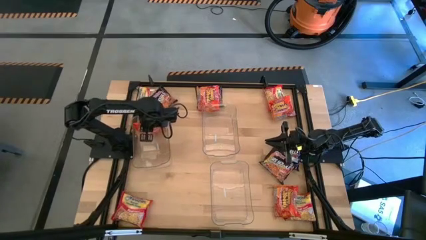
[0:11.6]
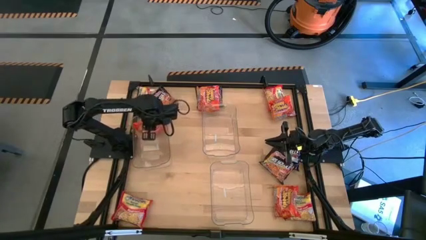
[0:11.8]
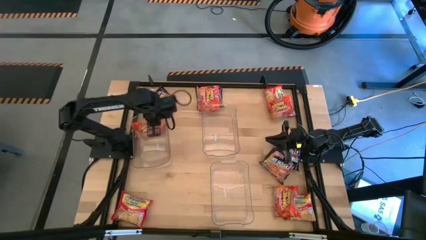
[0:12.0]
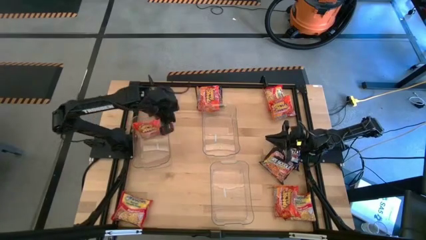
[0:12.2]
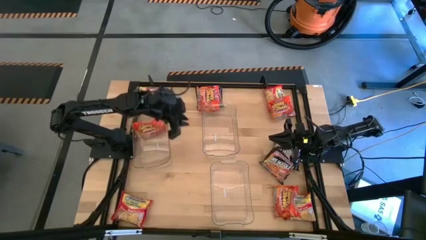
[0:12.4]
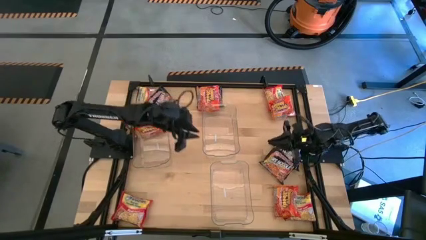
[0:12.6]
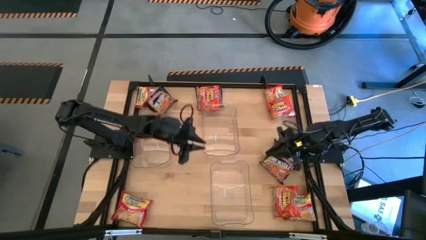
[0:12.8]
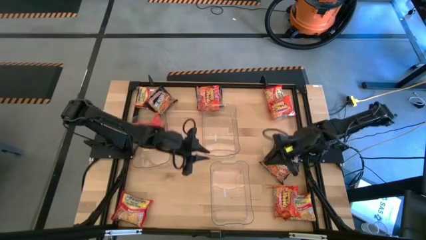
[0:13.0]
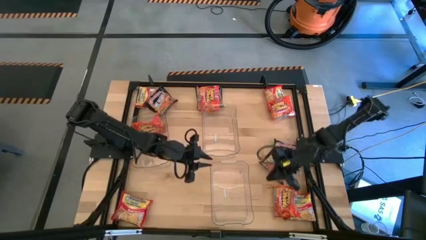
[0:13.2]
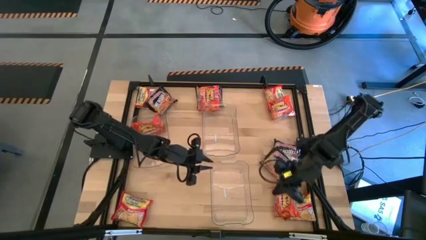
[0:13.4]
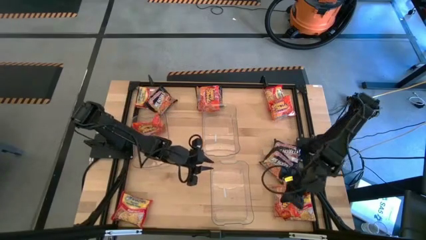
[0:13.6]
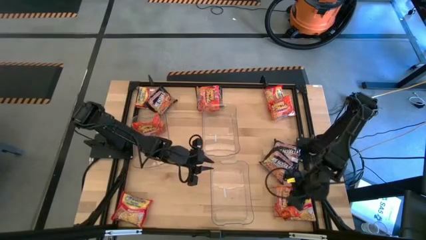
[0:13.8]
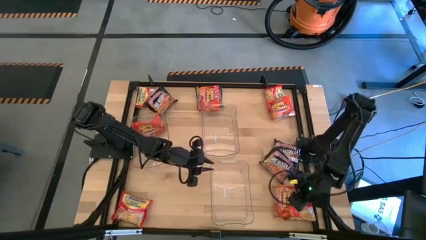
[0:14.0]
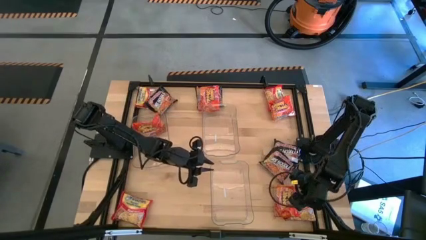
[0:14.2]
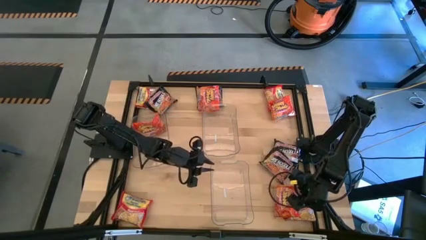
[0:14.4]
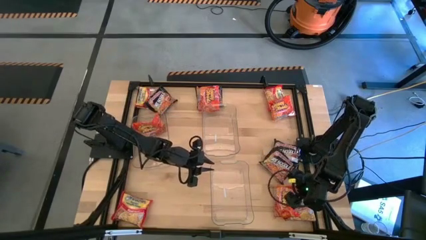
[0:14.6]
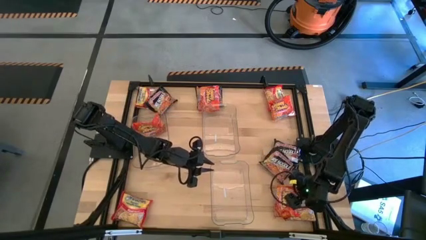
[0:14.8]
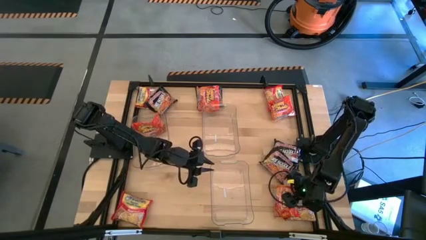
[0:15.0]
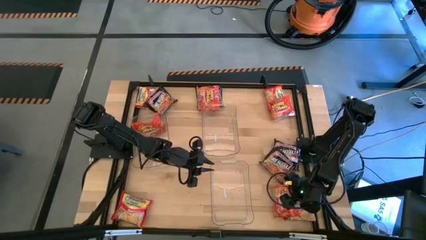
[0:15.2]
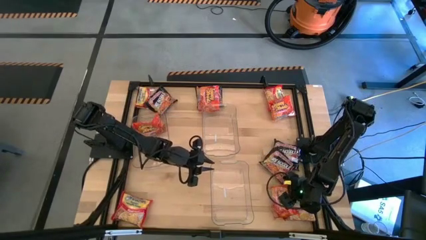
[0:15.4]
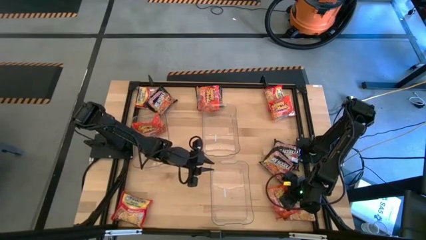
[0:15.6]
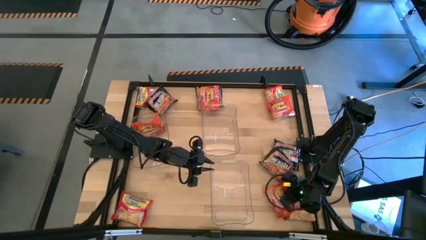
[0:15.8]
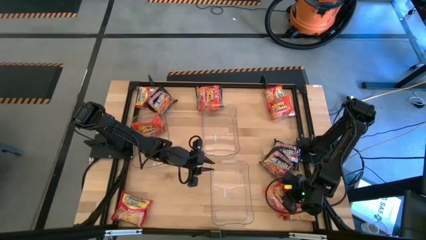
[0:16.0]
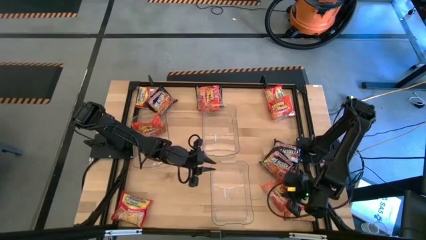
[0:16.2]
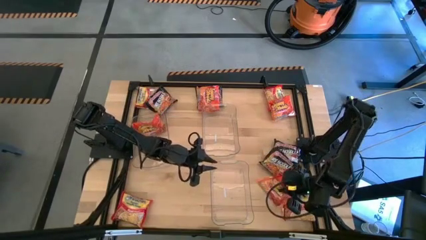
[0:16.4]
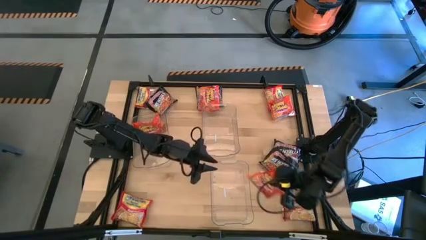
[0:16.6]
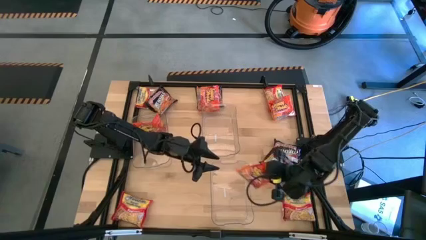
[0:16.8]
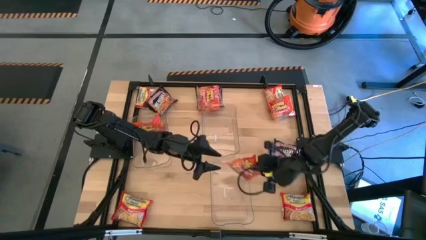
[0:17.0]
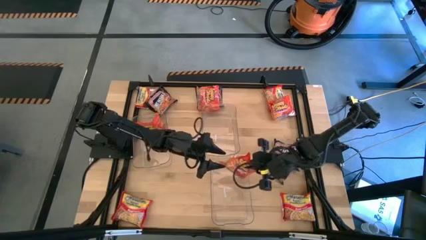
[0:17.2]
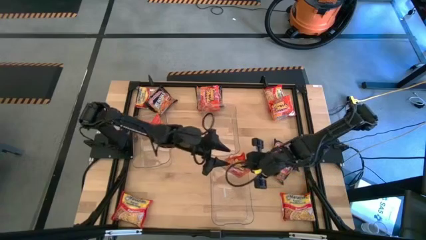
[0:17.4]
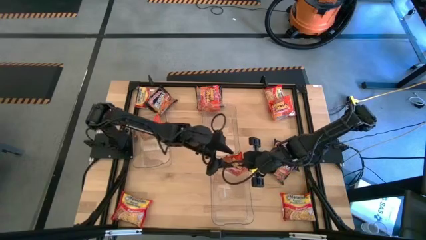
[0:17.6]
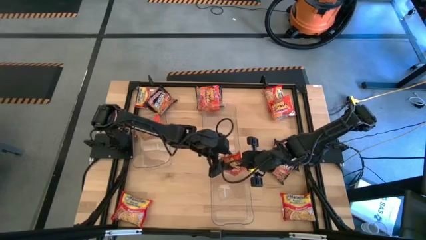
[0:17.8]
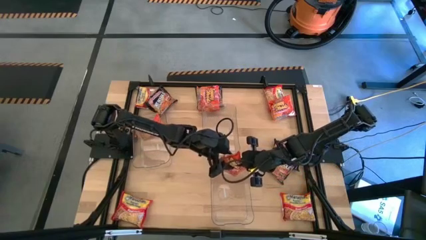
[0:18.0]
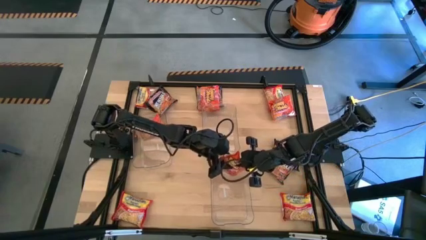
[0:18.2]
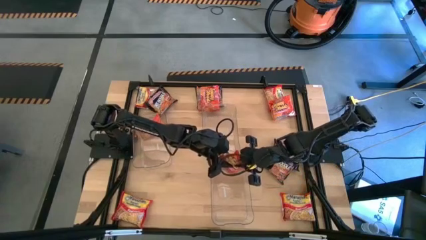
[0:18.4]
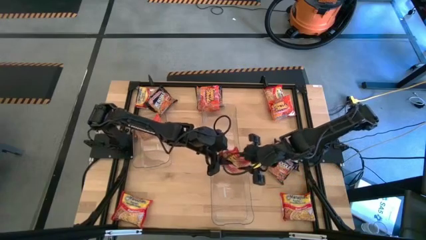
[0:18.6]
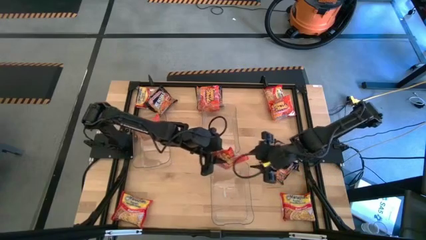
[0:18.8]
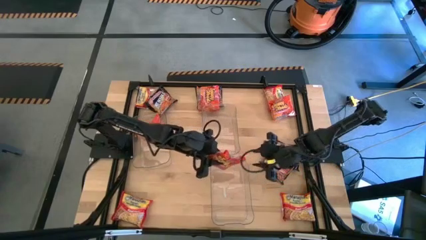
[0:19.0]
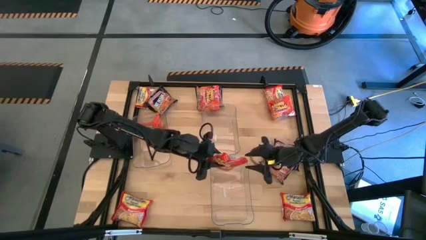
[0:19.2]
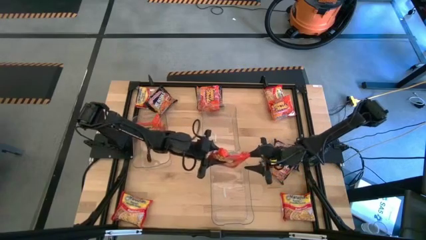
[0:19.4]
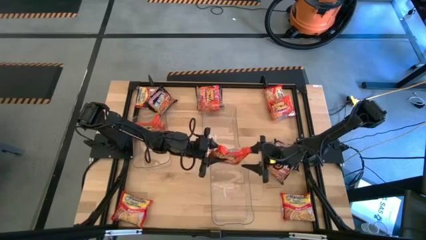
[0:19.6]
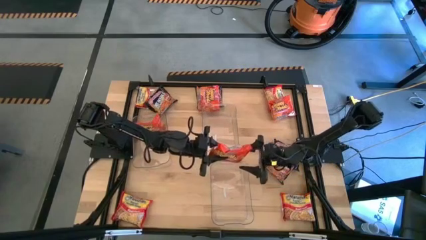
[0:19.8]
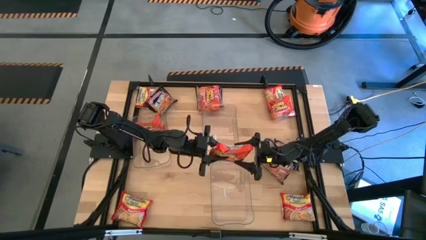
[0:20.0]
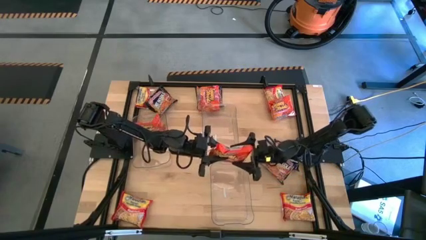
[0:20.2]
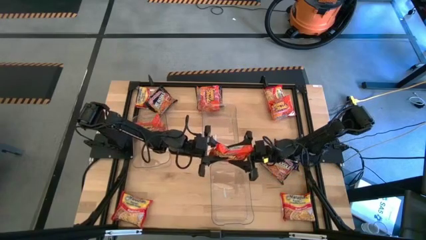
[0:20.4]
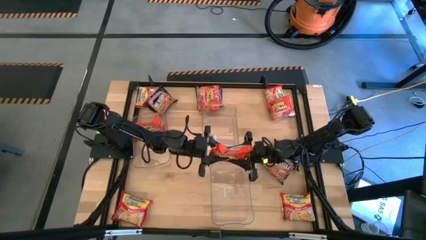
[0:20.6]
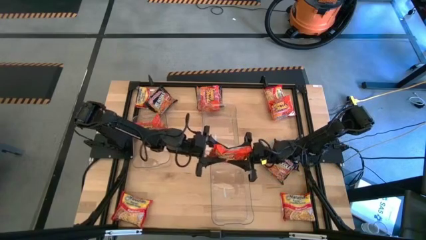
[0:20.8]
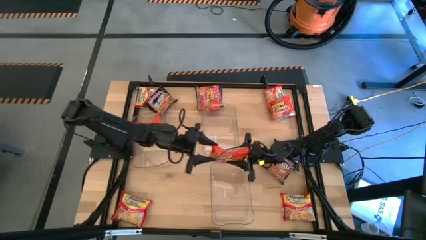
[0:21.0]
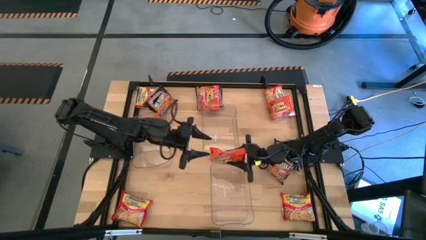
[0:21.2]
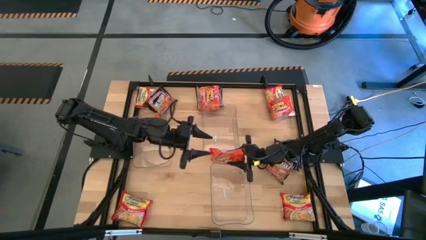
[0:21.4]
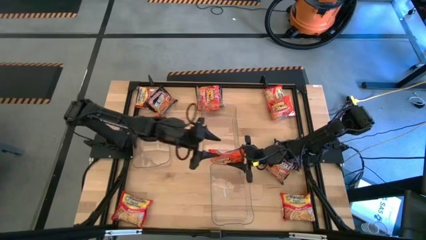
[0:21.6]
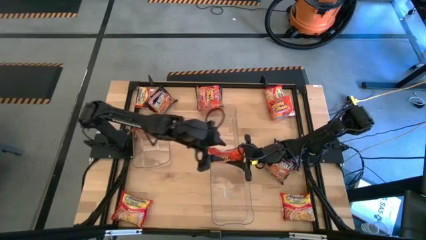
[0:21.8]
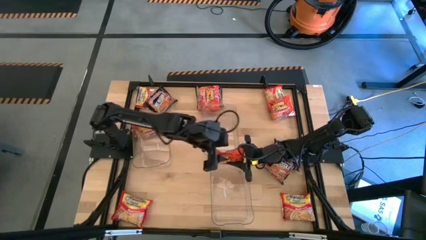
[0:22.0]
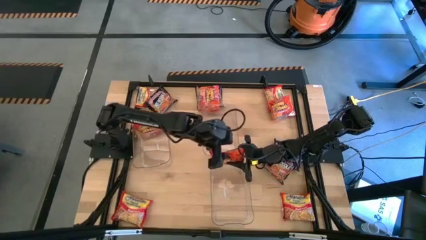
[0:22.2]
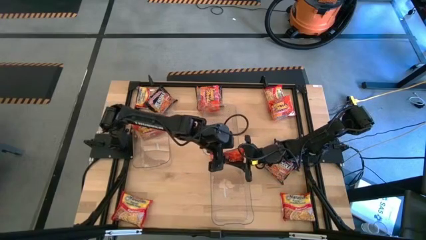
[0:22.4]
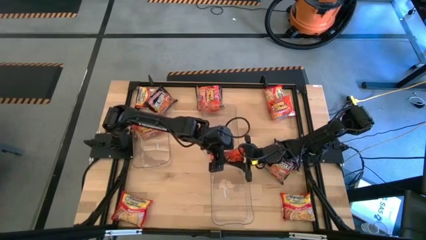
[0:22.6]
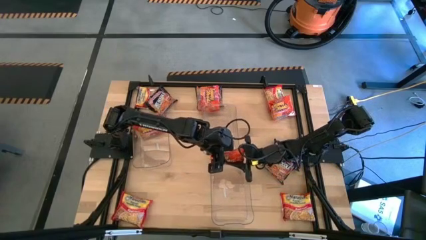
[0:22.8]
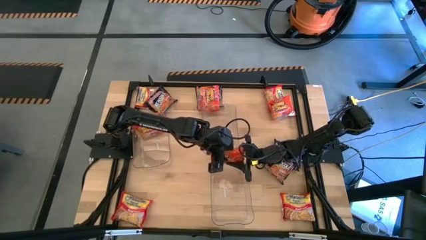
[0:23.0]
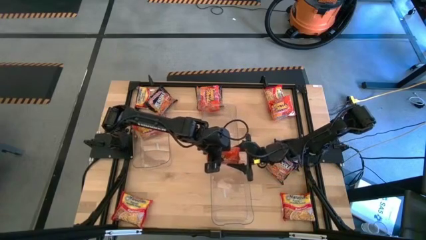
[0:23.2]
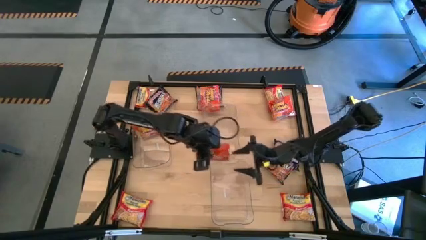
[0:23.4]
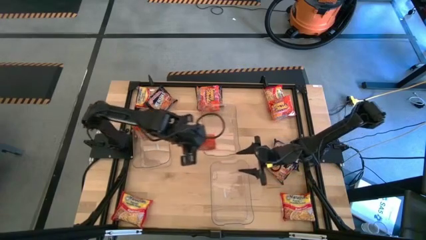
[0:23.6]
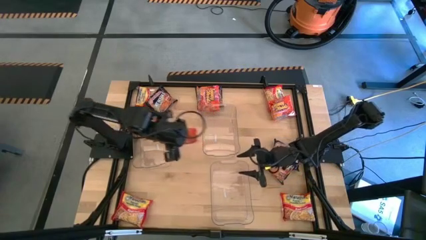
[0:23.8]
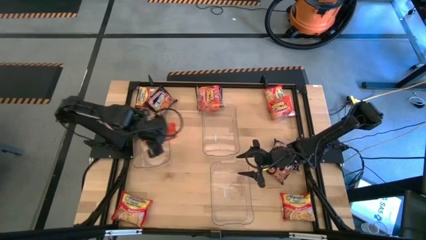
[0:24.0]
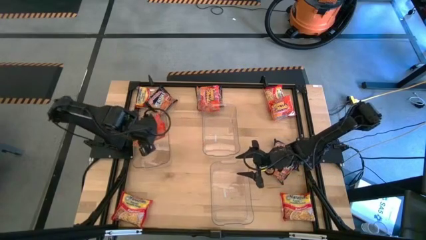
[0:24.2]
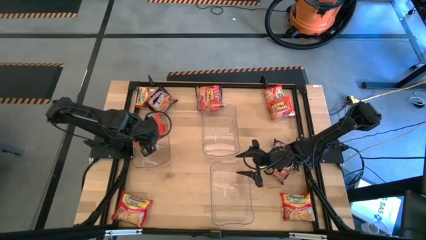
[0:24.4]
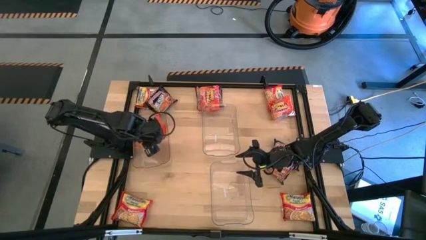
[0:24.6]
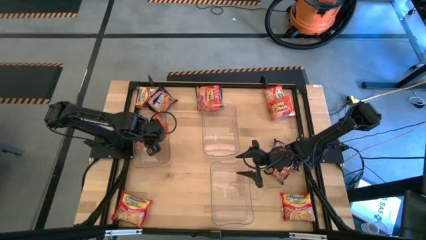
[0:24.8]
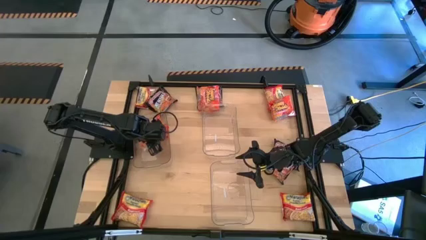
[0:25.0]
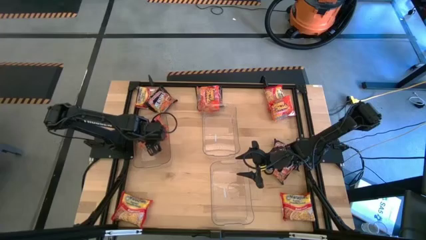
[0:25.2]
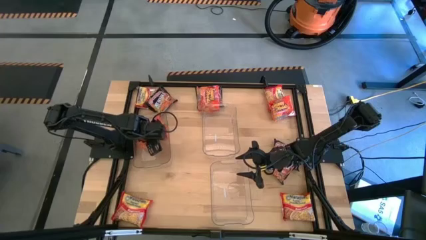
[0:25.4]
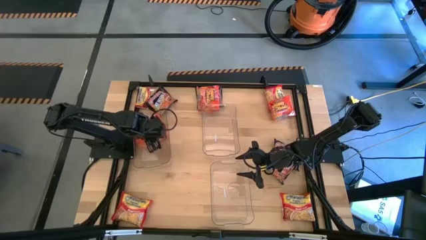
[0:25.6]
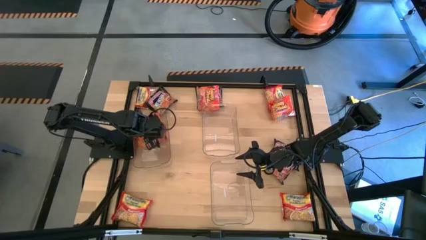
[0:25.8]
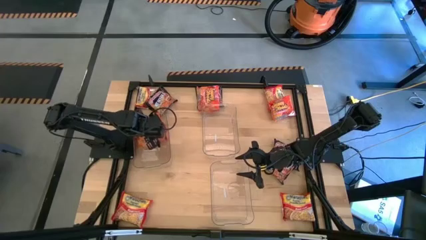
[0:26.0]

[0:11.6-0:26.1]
Task: Sort Maruchan noodles
Put the orange noodle pack into the top left transparent bin
